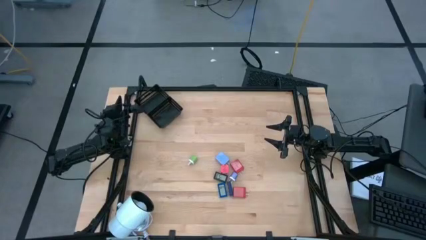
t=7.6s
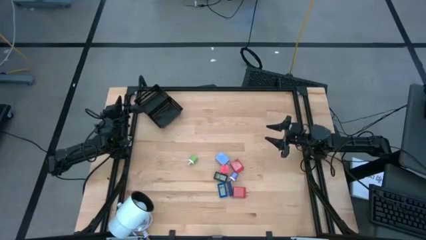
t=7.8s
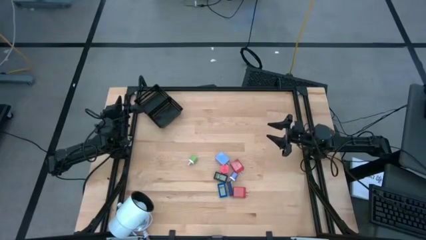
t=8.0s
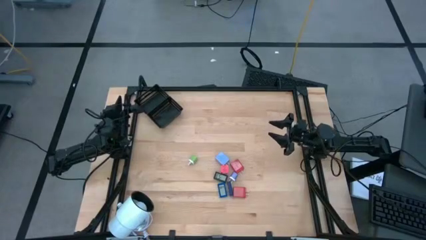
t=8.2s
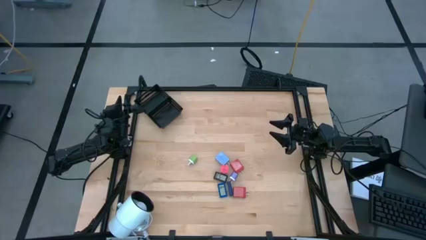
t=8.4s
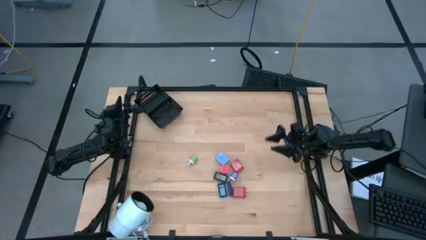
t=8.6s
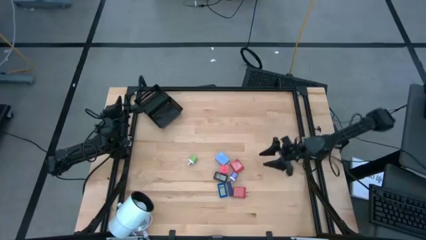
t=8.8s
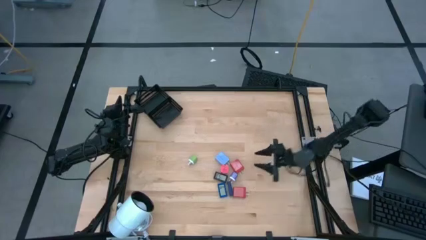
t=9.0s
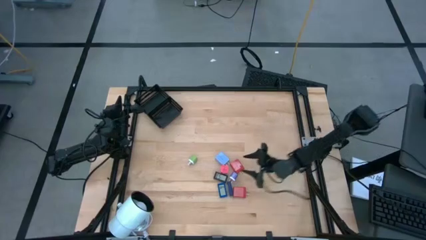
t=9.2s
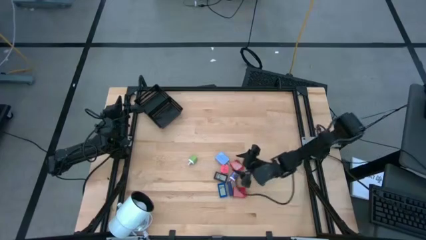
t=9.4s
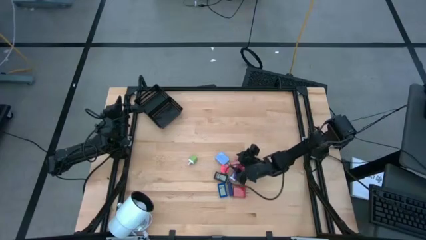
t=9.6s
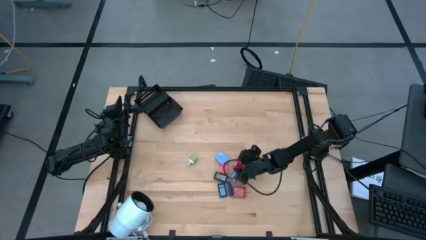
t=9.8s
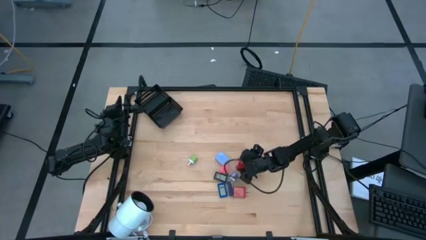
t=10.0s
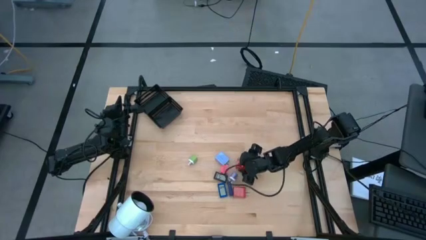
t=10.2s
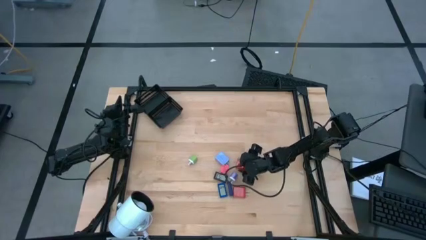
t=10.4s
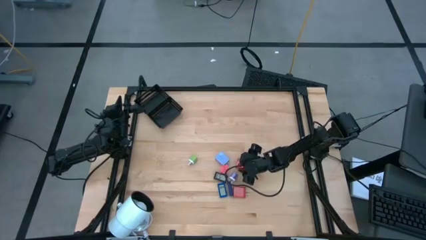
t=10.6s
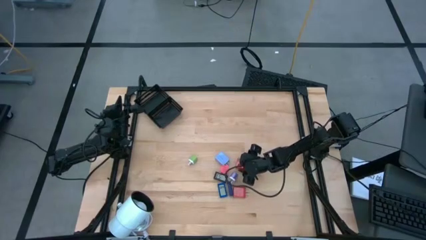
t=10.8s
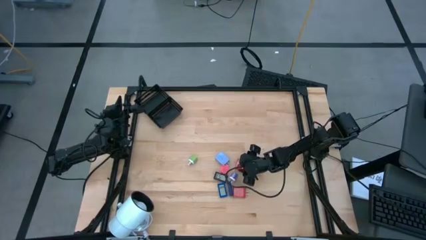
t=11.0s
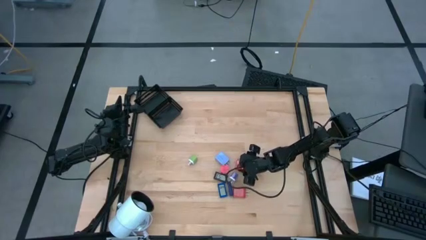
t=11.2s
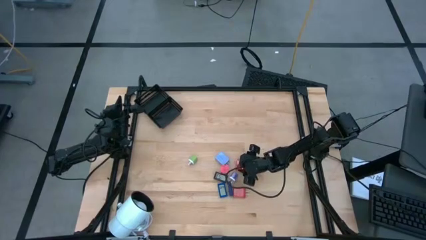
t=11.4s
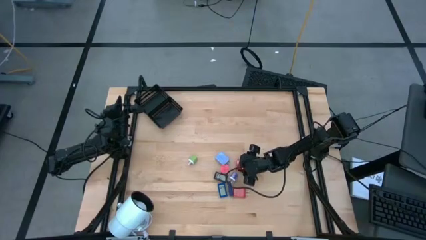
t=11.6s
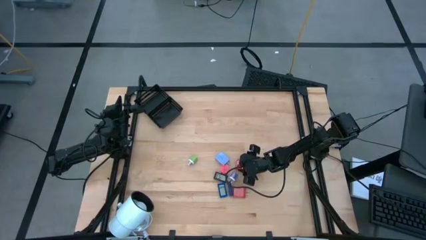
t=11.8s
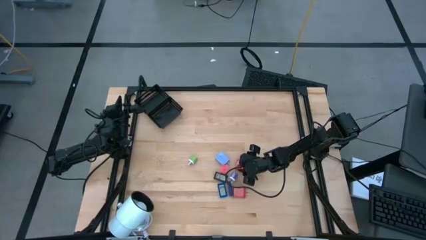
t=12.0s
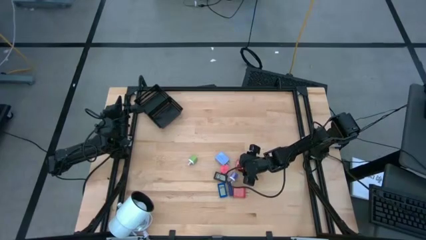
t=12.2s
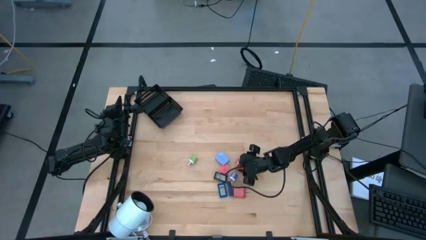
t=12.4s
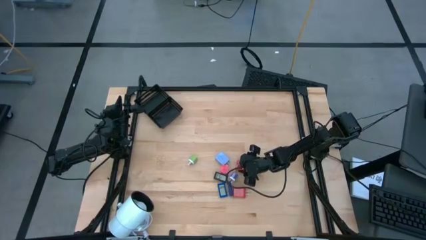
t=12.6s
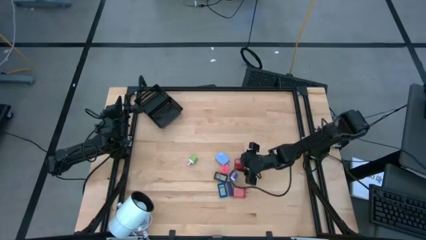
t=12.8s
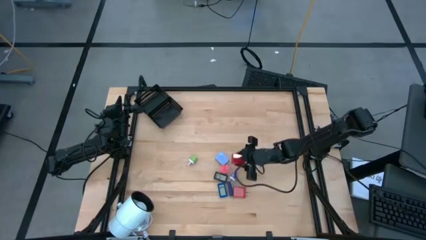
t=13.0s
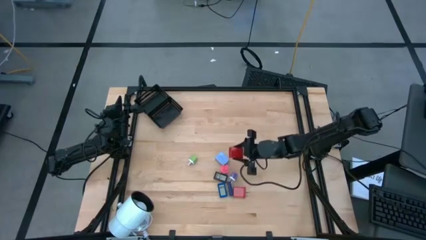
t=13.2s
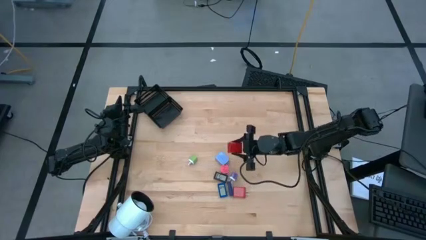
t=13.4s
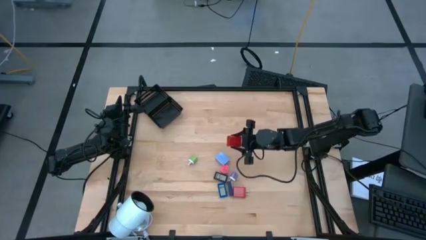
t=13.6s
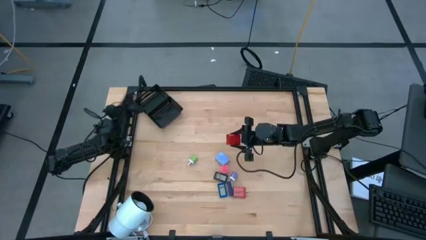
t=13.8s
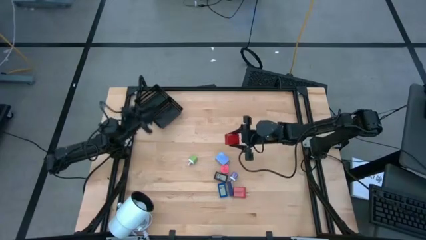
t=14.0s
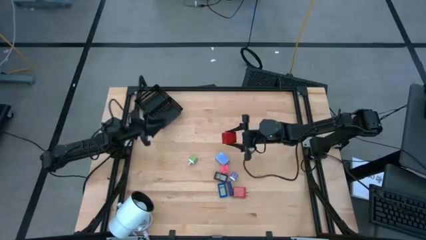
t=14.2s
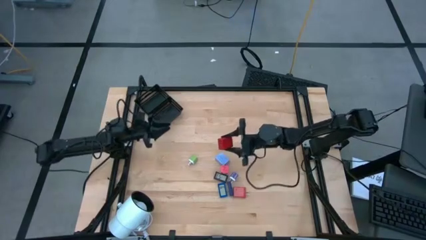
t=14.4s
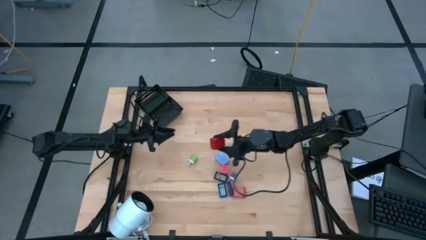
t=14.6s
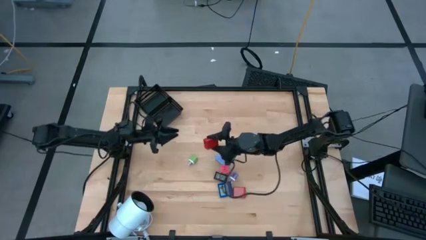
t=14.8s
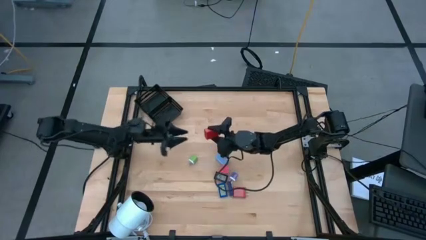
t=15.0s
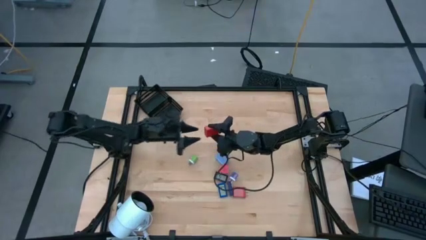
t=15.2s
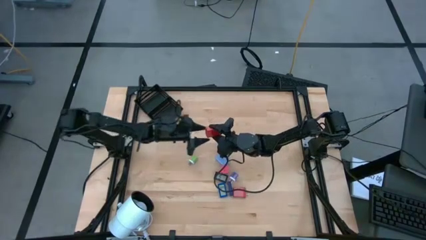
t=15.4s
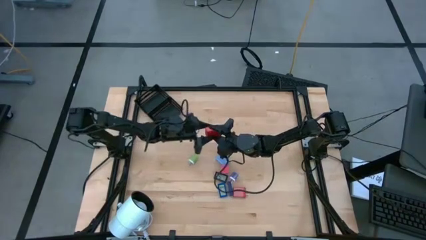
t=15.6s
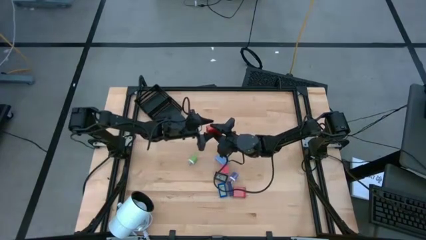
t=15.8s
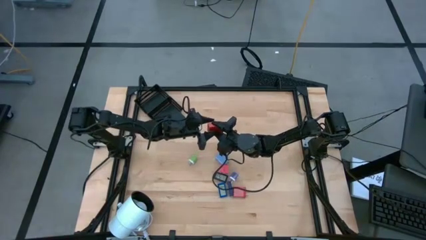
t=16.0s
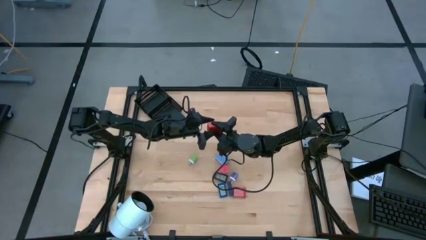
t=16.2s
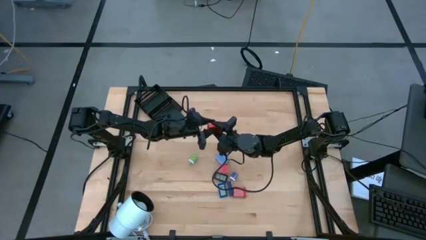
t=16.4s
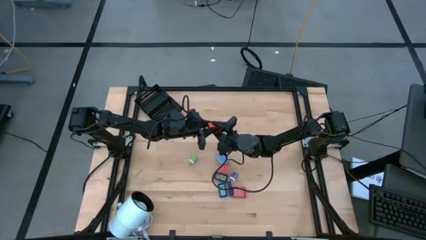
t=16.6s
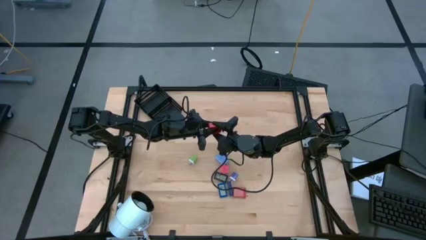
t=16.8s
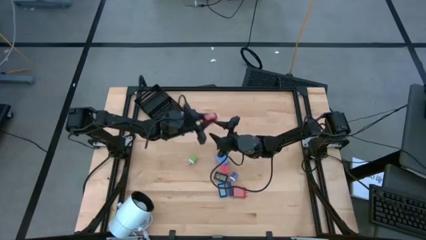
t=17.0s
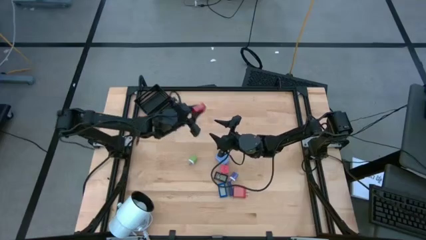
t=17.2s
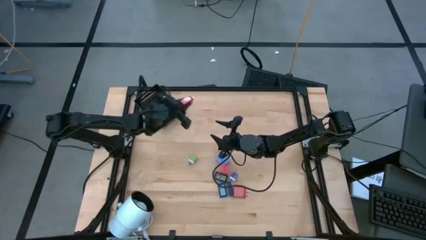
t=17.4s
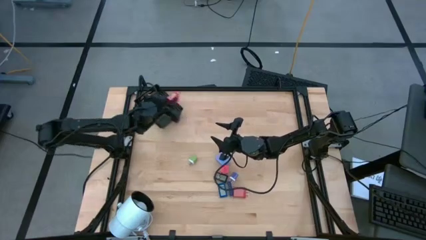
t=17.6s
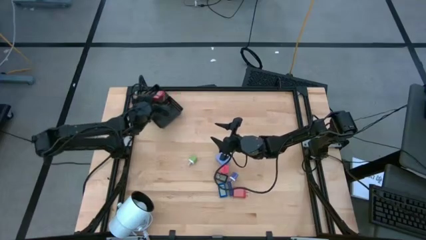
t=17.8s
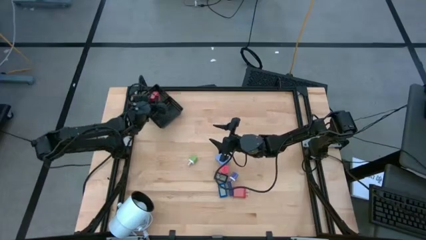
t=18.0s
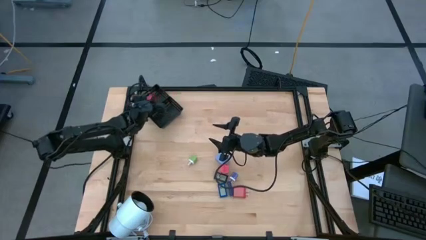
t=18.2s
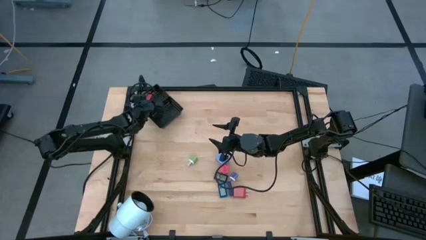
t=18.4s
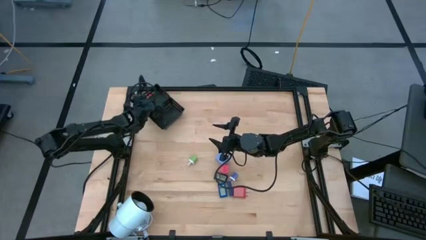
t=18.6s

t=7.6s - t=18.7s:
Task: Pick & Place Office items
Put the top red charger adapter into the top black bin

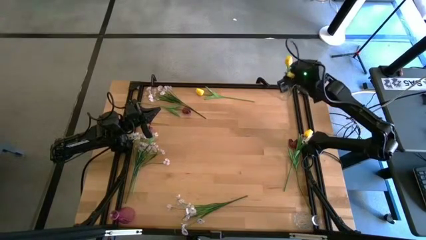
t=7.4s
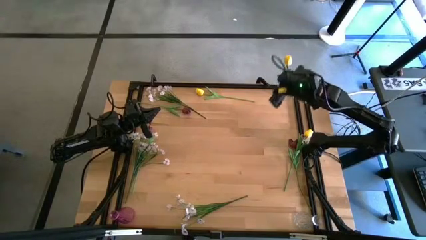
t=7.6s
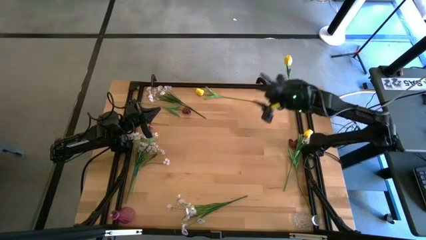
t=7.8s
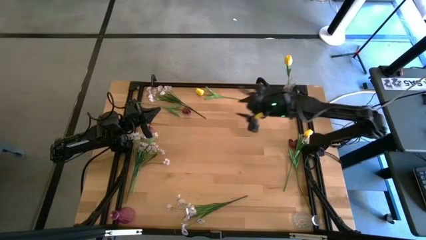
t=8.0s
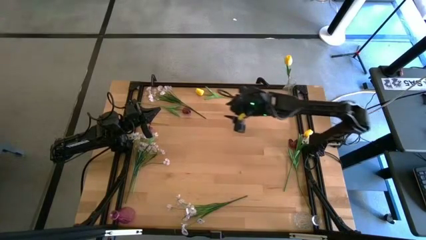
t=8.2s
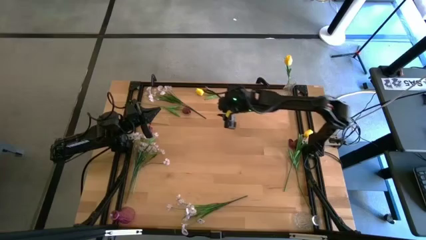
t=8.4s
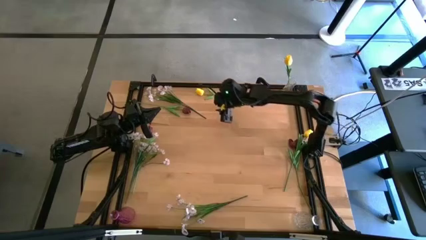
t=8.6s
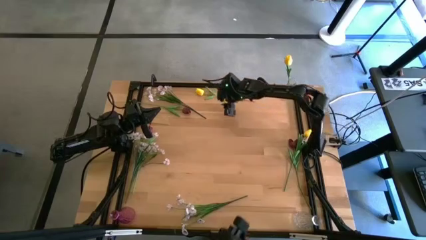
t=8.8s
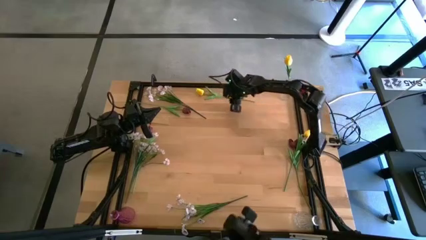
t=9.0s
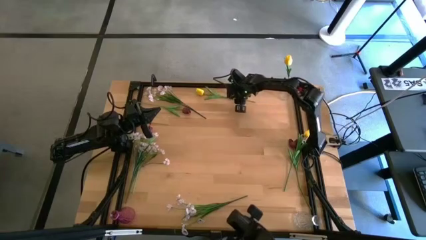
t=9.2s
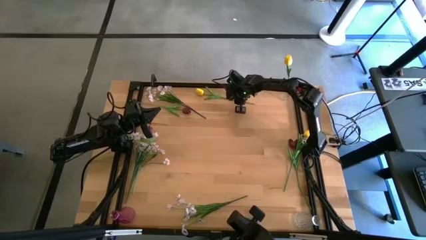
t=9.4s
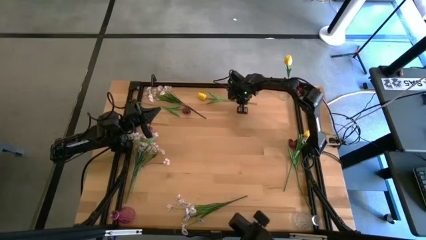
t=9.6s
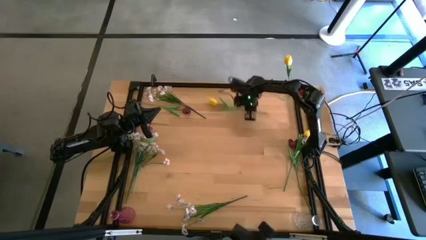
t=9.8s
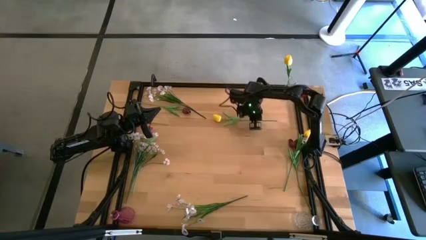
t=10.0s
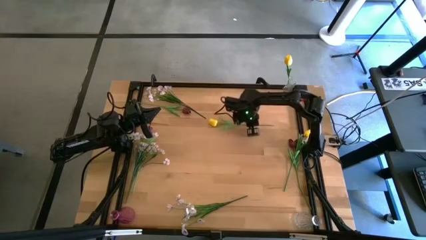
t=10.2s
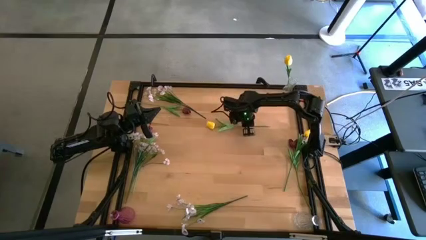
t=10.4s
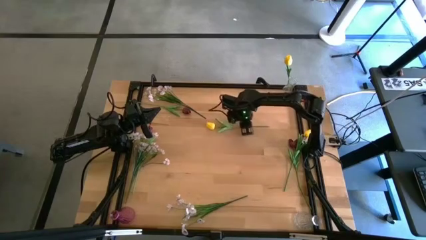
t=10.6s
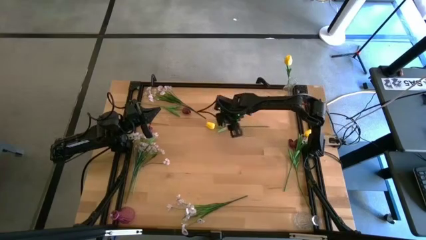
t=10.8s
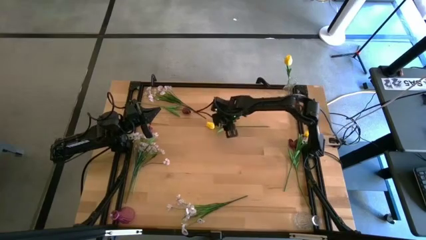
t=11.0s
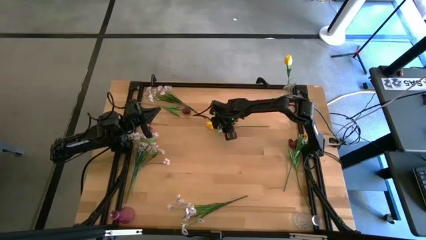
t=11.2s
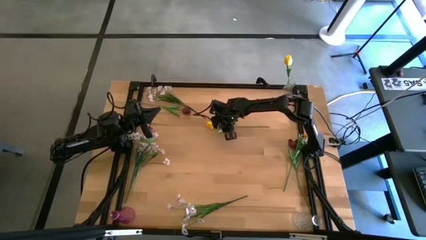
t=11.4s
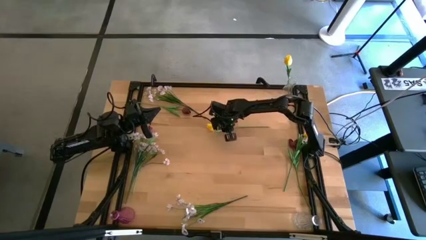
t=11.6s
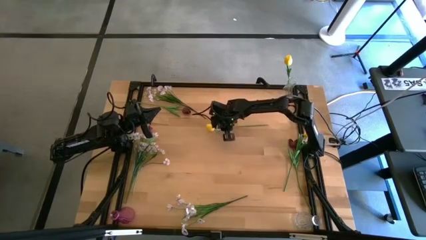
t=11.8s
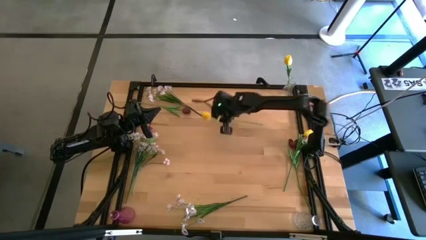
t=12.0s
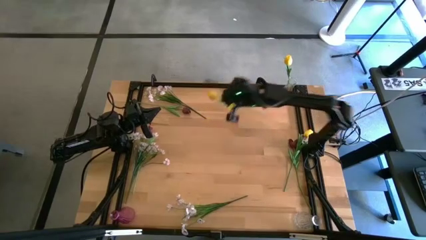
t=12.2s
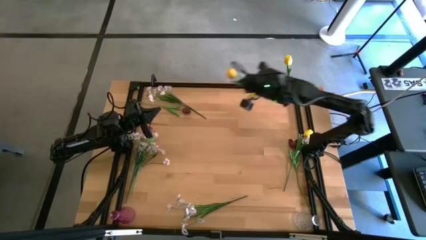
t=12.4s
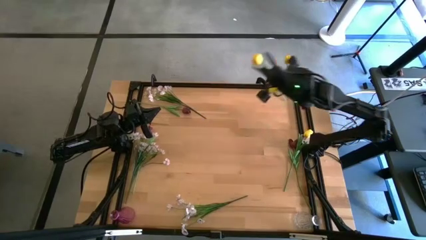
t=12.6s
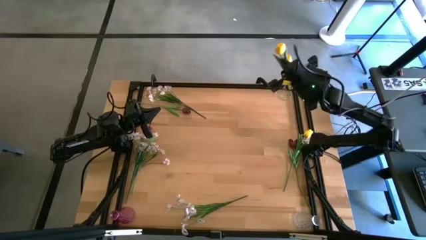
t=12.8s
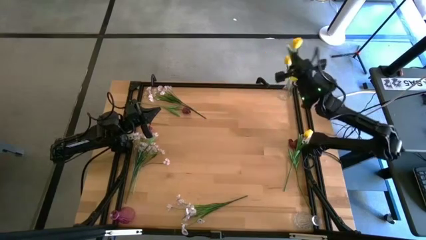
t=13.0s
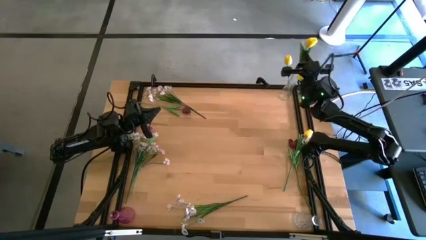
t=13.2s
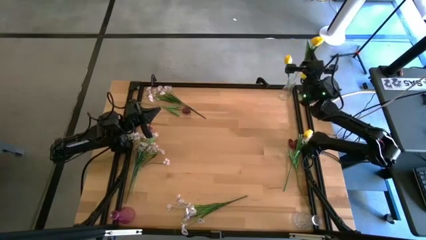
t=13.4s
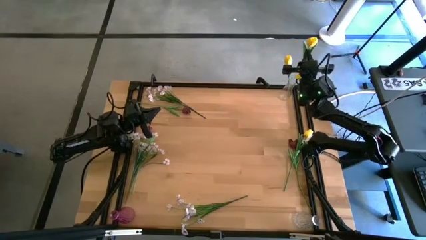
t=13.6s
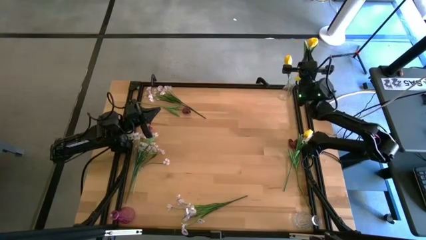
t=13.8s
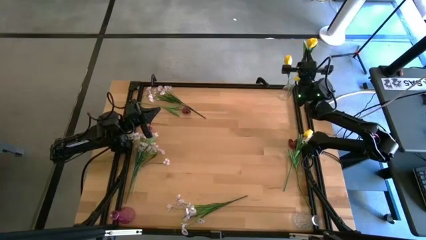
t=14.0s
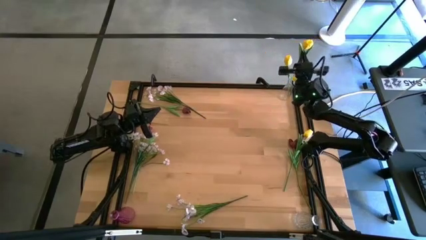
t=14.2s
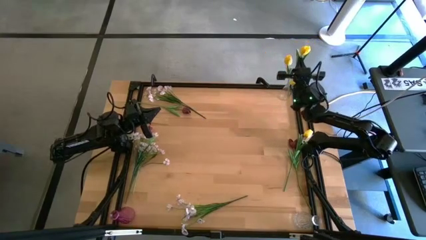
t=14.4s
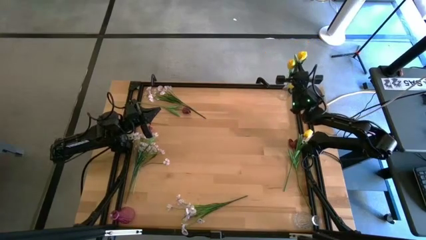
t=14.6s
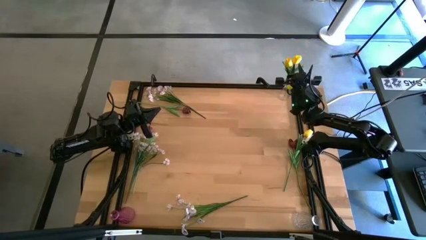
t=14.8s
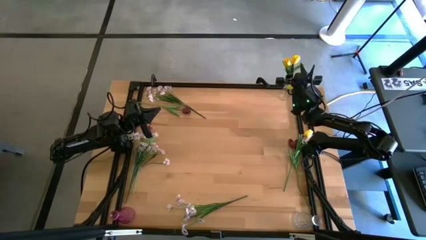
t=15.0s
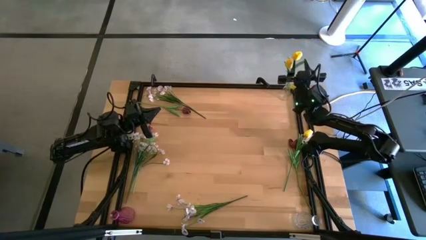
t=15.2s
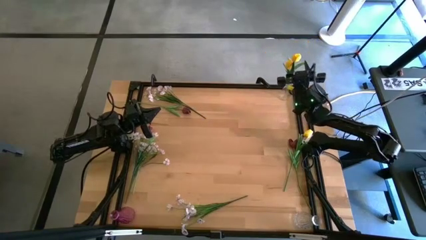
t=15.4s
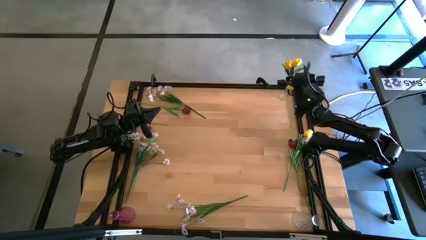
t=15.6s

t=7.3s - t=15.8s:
Task: Sort flowers into vase by color
Put the top yellow tulip into the glass vase
